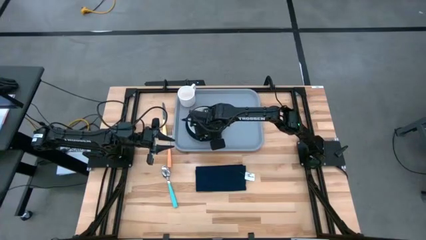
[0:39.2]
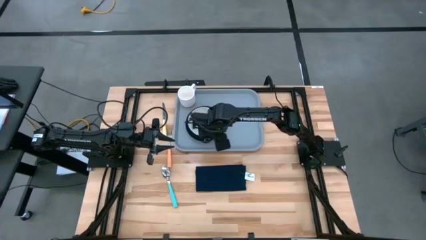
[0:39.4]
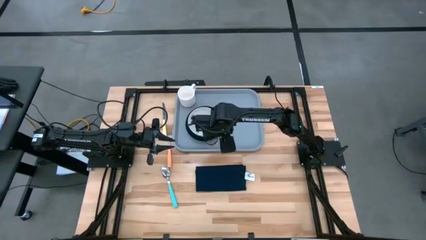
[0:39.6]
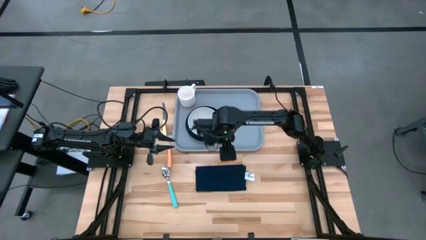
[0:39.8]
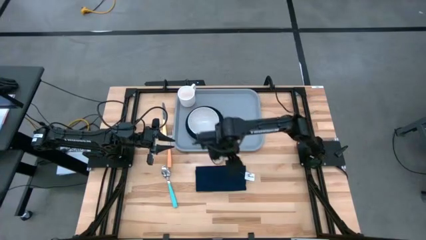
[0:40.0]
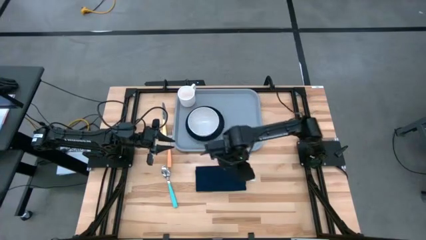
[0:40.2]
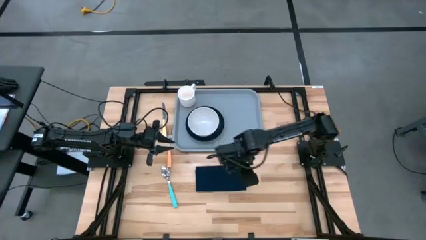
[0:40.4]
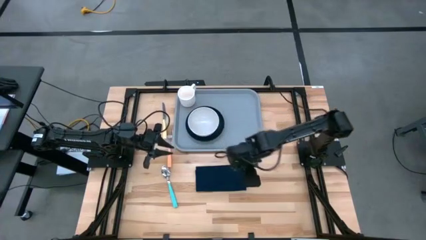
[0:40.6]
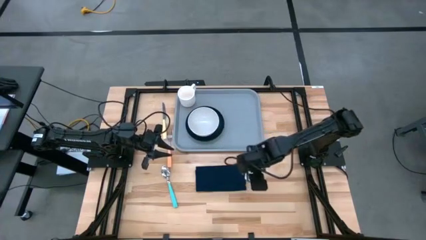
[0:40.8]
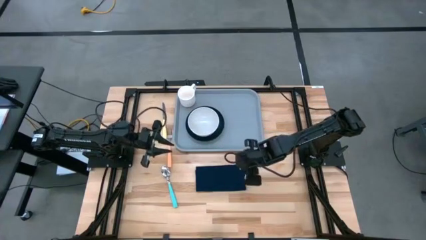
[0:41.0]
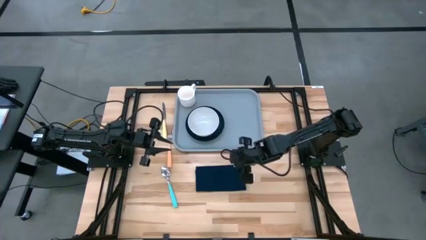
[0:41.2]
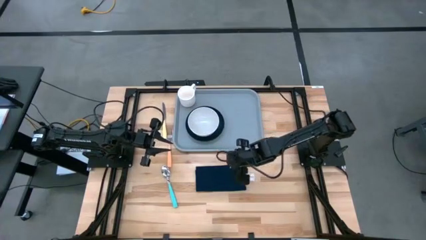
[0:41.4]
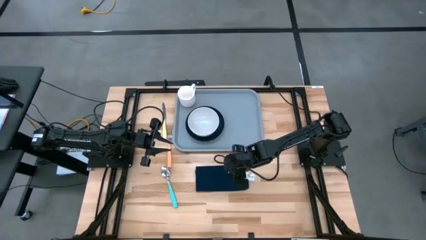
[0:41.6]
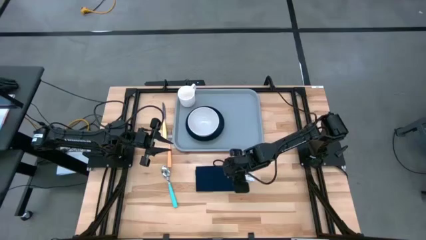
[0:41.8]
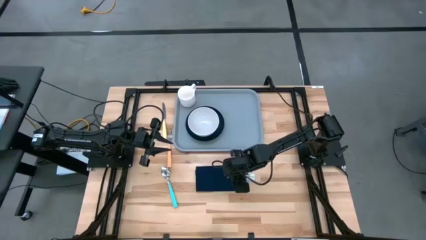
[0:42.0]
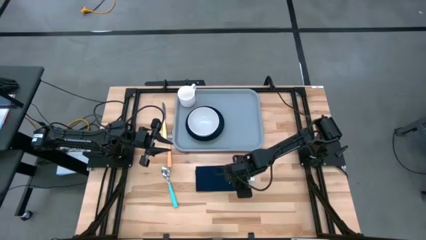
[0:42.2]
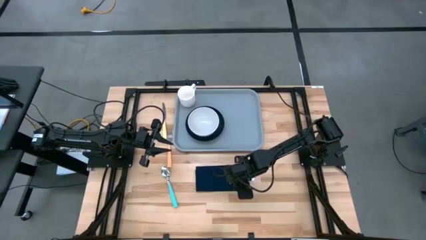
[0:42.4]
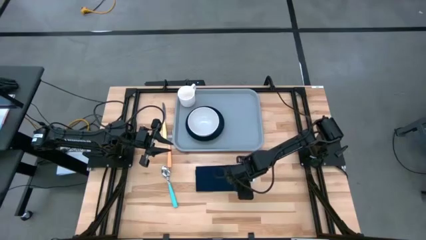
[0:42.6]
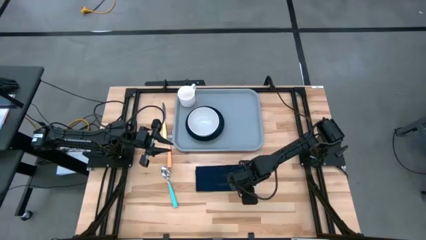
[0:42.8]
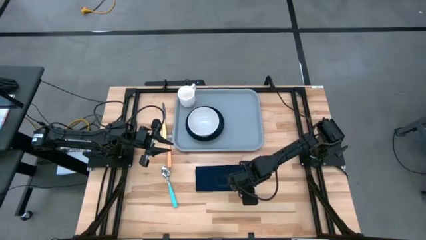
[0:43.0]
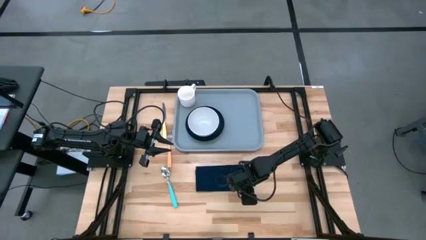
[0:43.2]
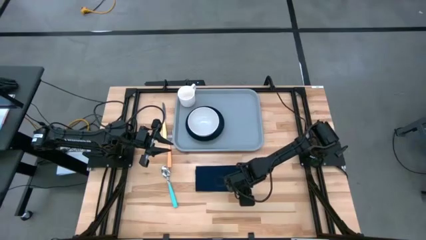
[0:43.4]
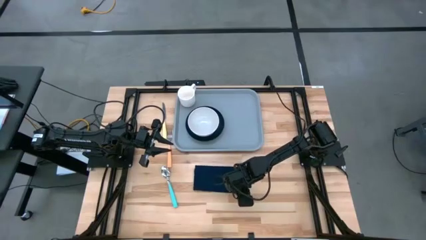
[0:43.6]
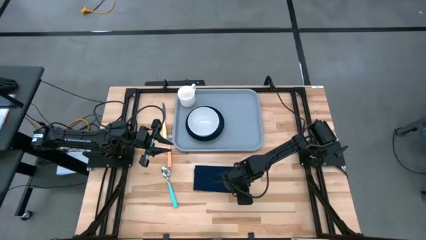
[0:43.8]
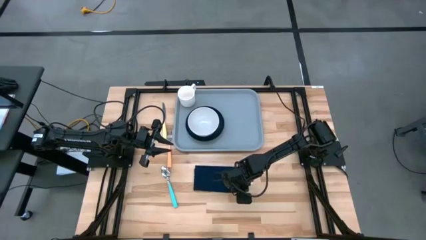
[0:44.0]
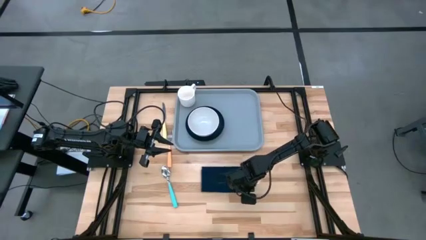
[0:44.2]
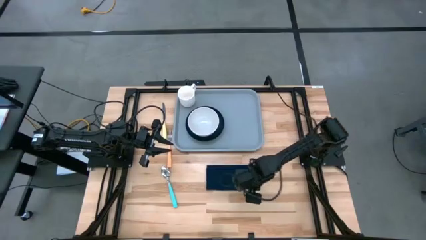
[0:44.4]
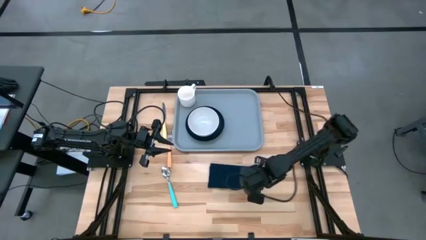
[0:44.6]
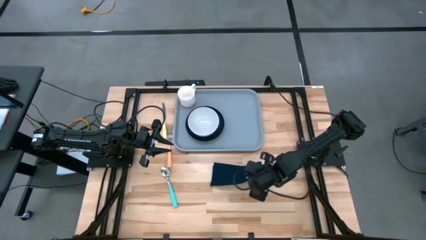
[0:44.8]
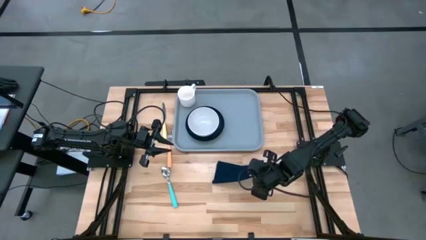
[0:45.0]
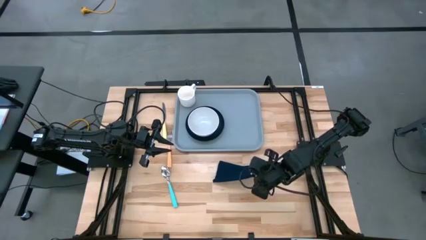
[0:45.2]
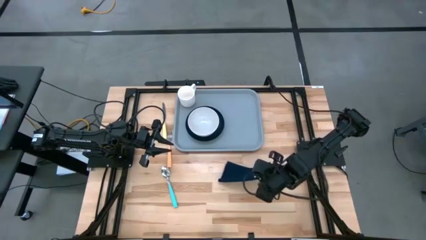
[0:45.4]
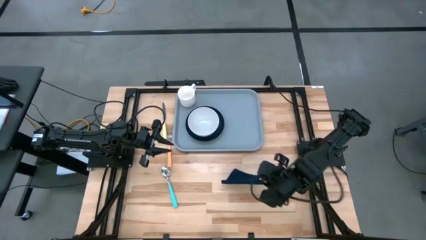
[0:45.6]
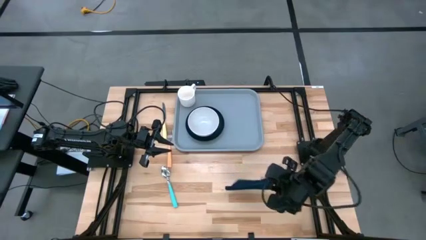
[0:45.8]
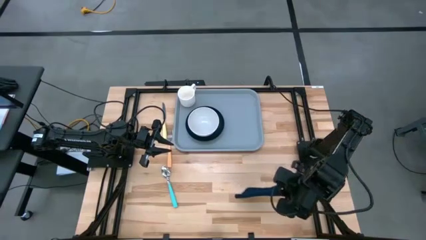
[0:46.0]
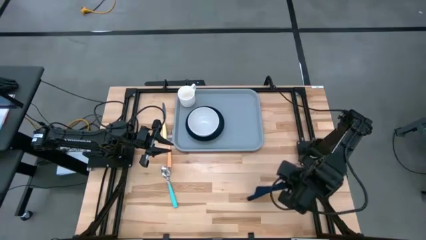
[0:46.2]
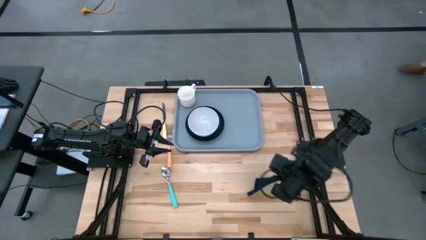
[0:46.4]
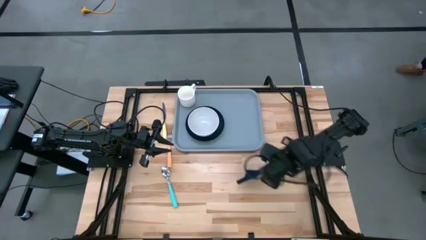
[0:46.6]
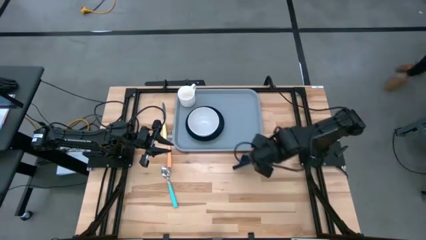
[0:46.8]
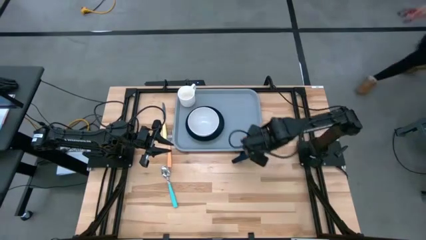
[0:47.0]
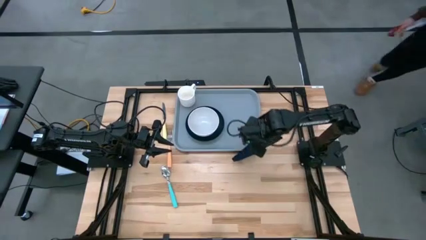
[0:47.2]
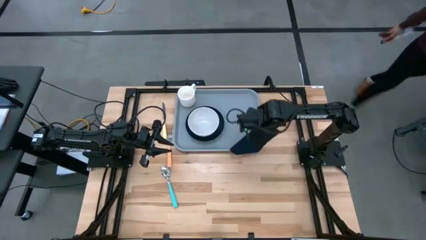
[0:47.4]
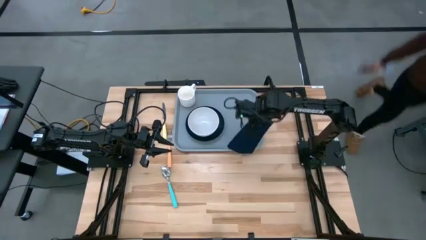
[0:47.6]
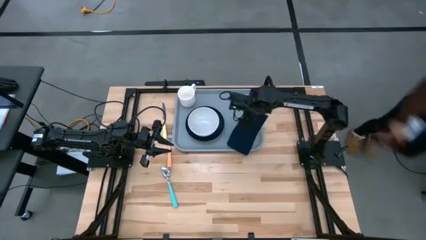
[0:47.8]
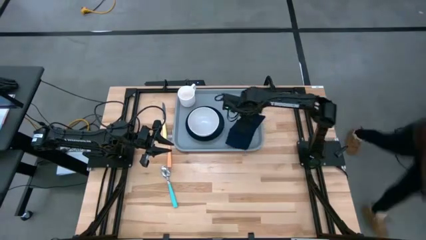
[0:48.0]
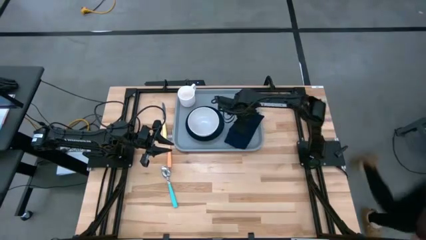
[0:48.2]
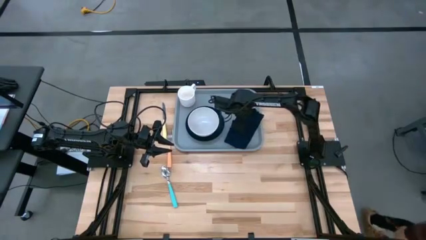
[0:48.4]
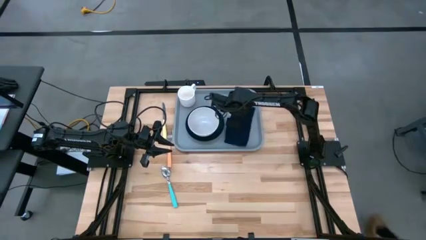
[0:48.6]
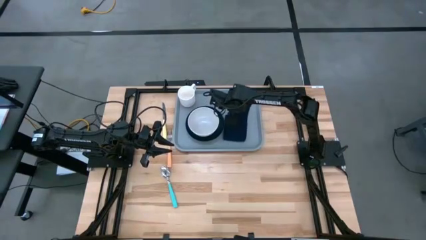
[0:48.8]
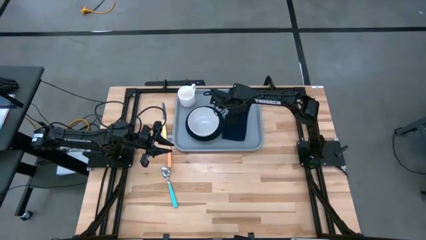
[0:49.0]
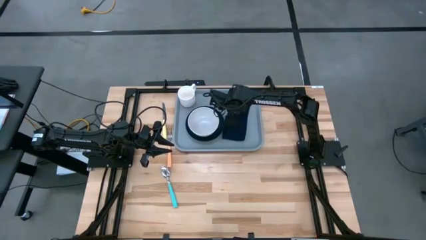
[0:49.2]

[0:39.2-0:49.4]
Task: Set up tray
Put the blue napkin to the right of the black plate on the gray tray

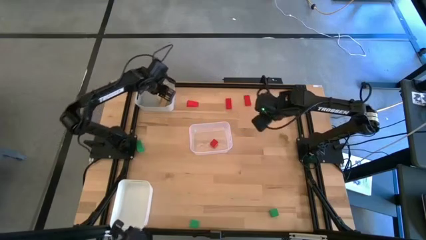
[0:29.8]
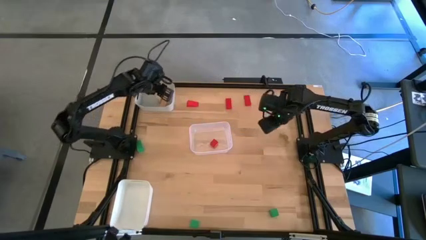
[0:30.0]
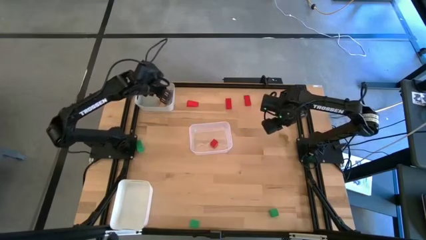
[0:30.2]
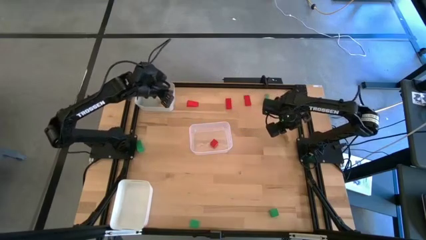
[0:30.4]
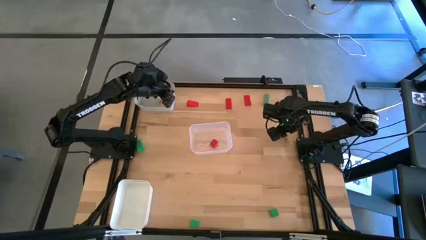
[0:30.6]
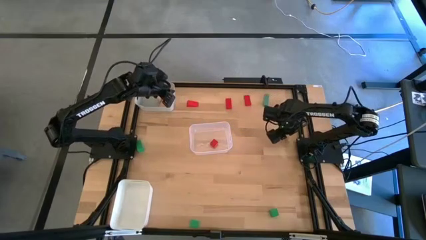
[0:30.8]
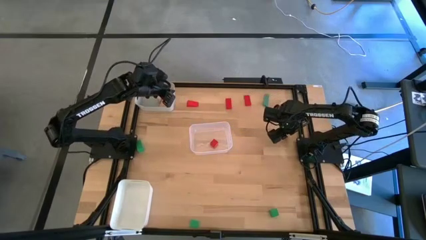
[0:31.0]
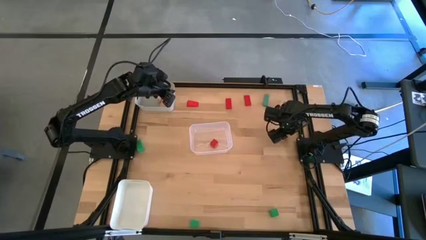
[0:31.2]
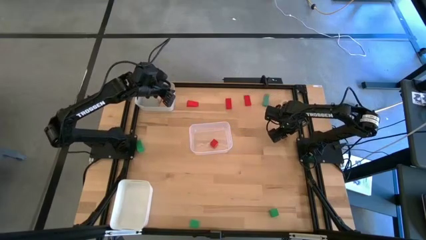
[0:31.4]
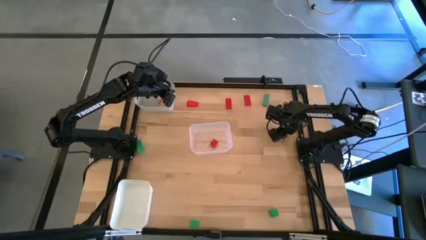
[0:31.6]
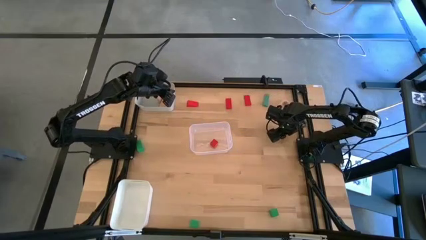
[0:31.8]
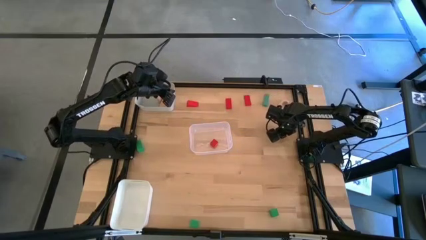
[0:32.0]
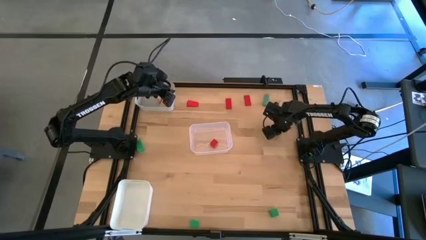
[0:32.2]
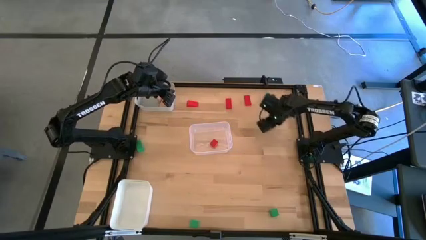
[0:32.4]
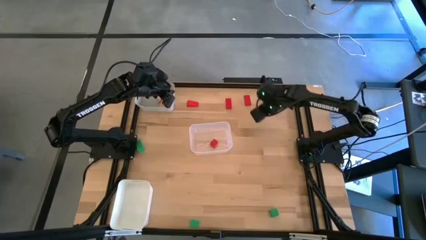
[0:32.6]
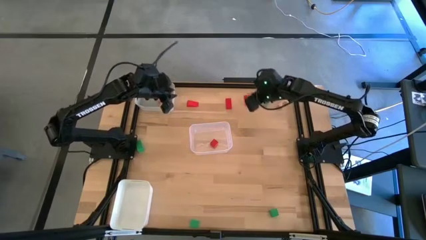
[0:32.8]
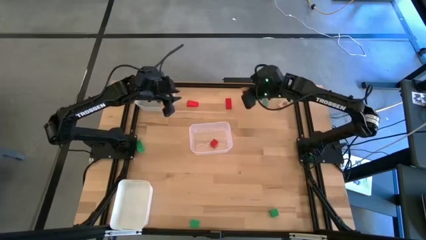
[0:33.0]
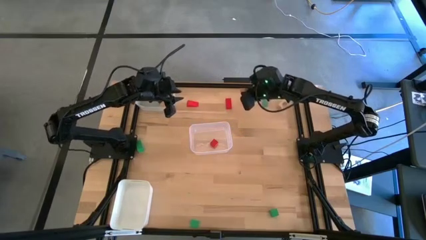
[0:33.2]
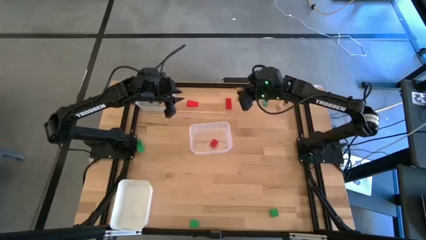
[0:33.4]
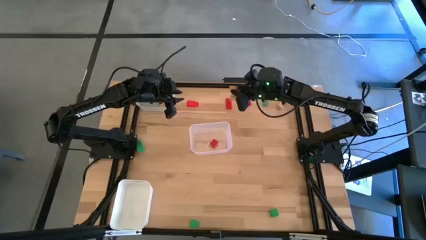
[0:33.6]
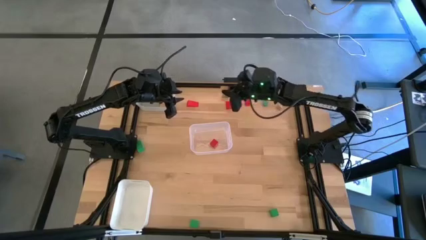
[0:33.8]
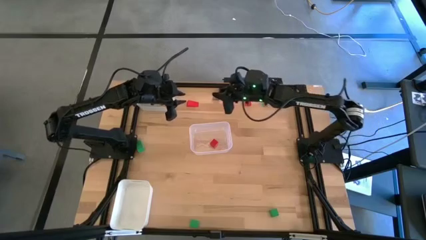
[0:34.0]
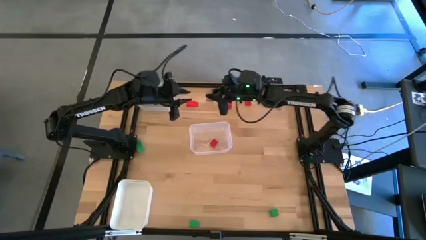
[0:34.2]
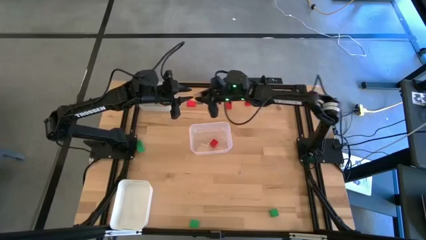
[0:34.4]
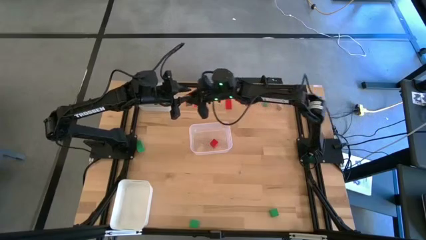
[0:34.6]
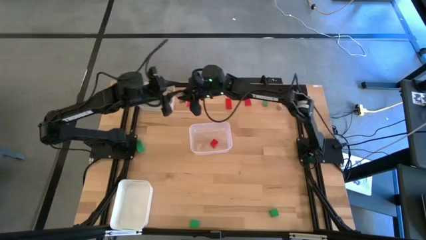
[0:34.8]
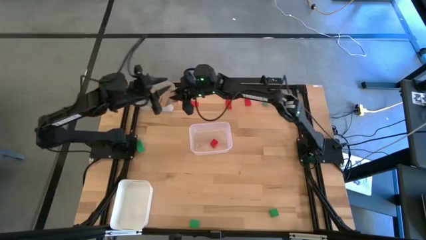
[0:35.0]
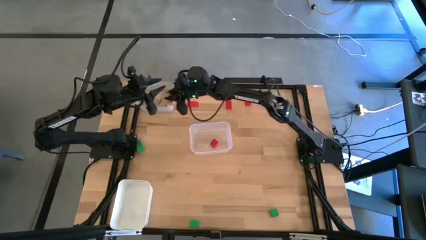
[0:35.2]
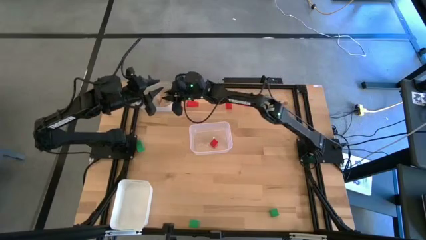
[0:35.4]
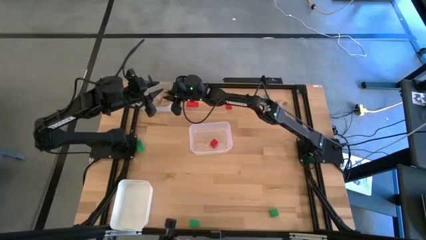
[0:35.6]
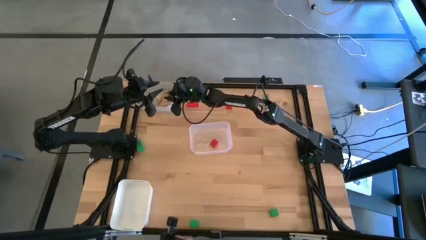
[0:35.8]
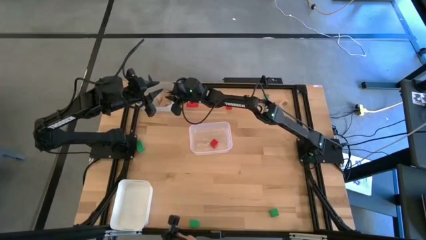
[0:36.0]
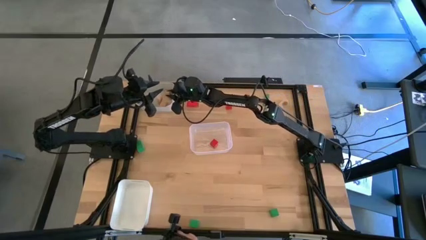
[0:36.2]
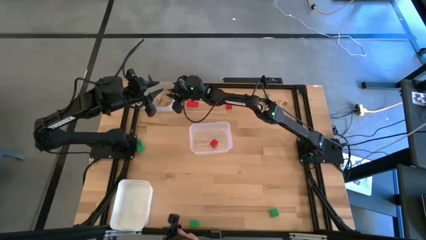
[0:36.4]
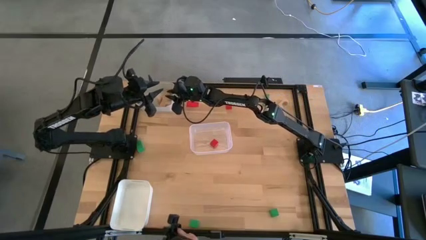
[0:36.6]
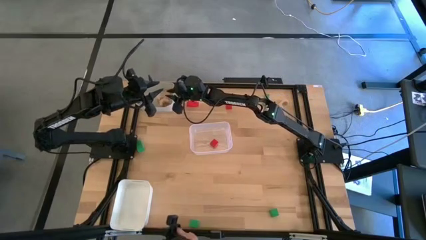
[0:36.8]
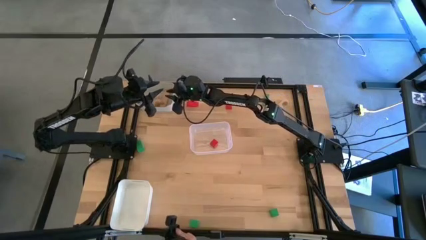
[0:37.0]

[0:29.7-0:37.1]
Task: Sort & place blocks by color
Put the right brown block into the gray bin
